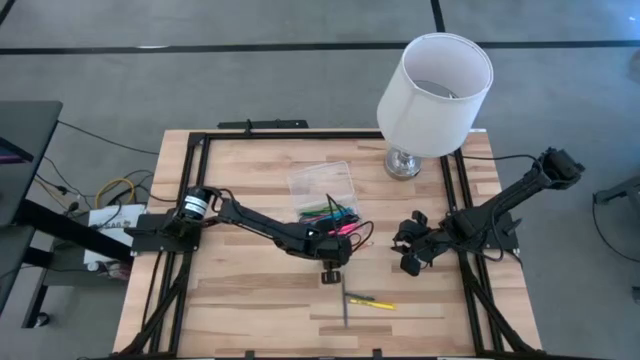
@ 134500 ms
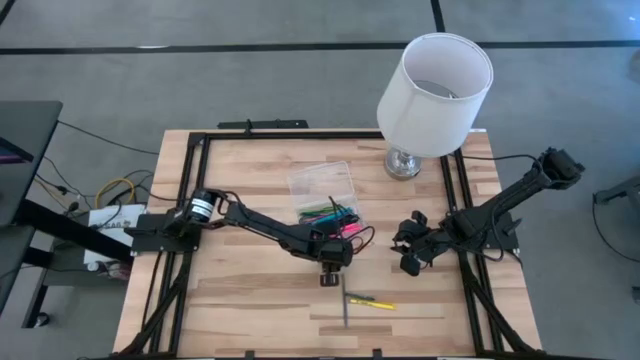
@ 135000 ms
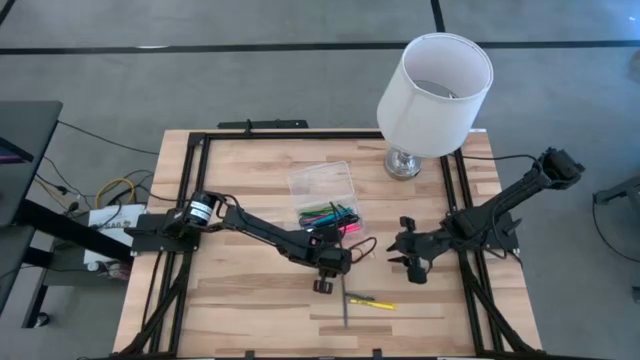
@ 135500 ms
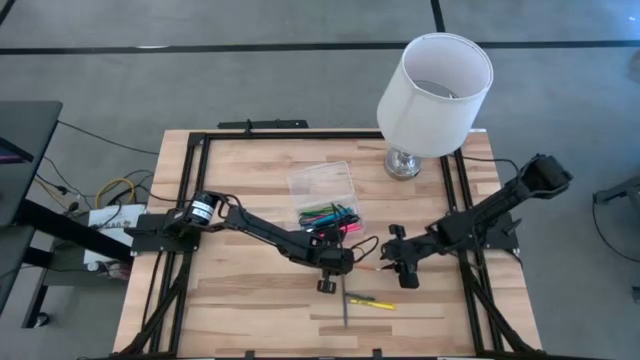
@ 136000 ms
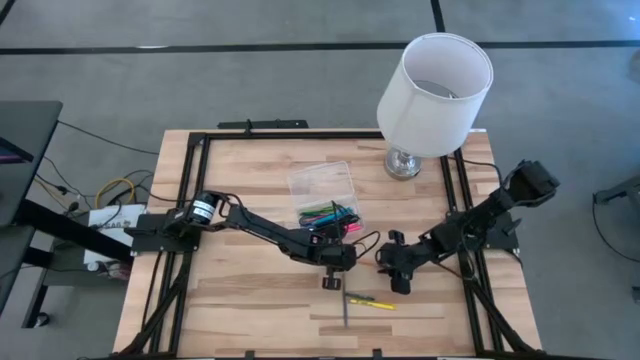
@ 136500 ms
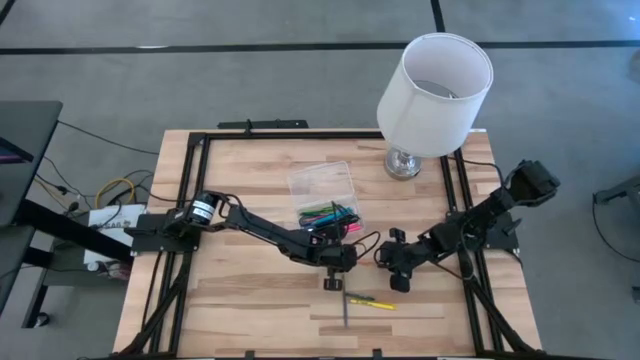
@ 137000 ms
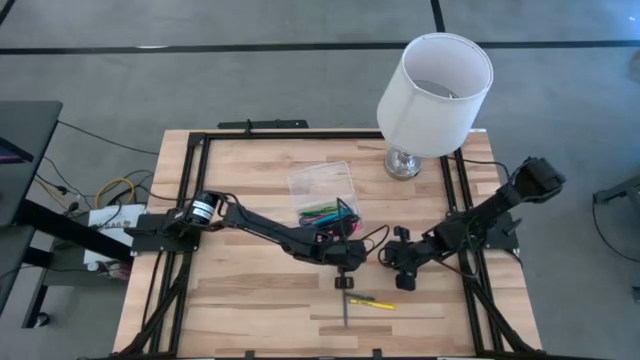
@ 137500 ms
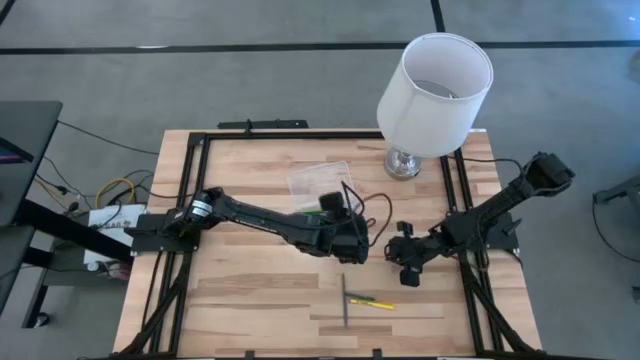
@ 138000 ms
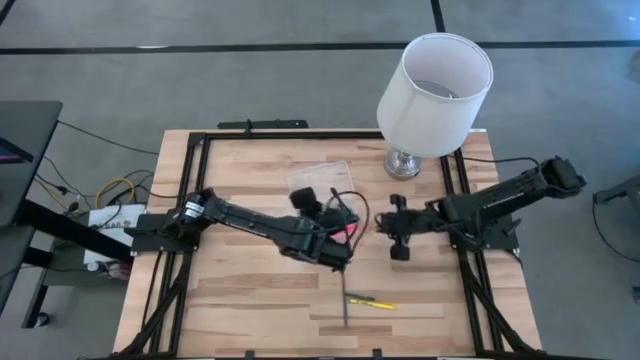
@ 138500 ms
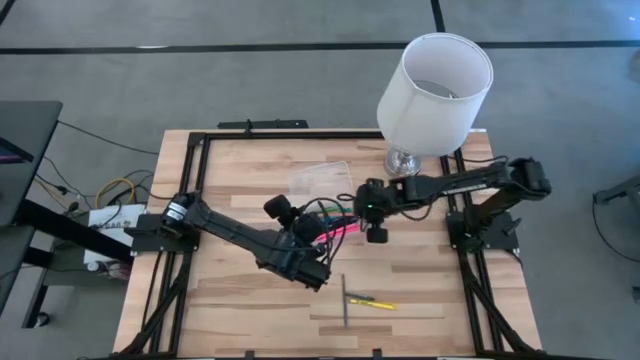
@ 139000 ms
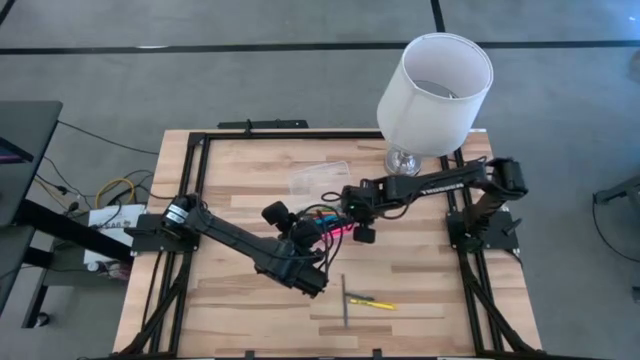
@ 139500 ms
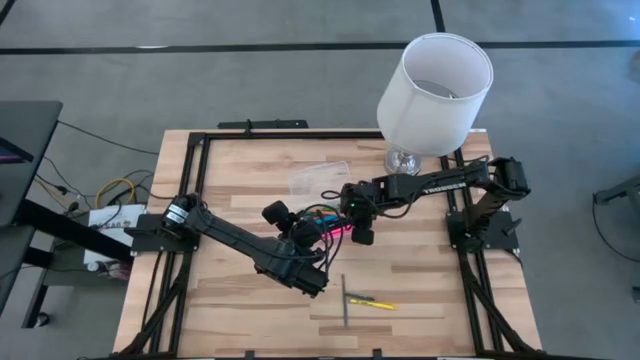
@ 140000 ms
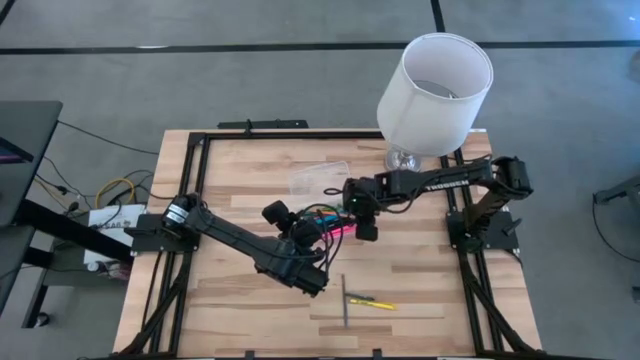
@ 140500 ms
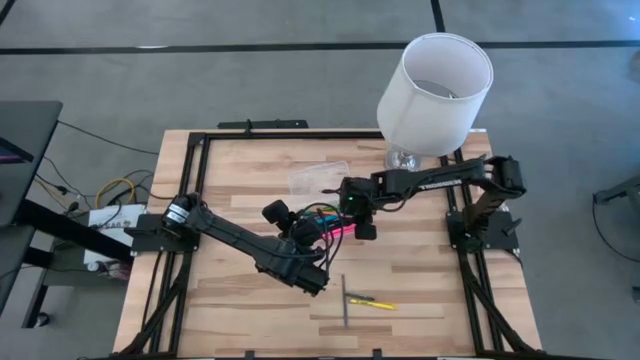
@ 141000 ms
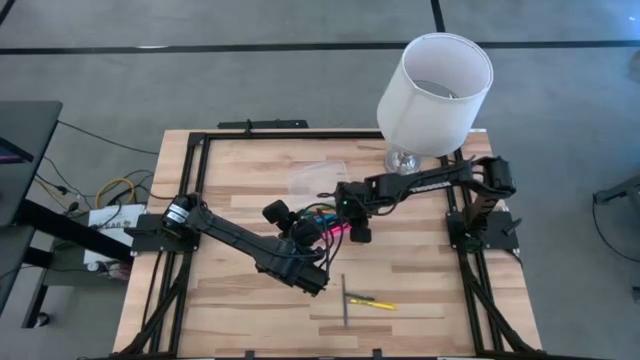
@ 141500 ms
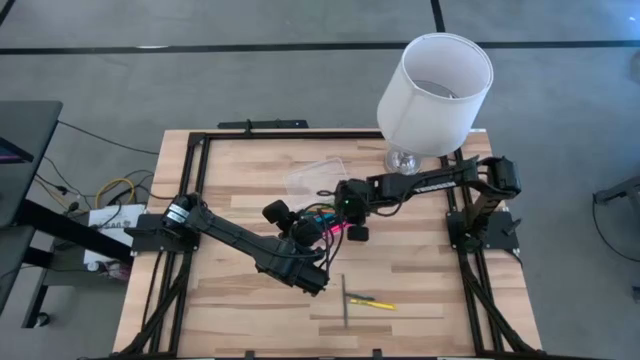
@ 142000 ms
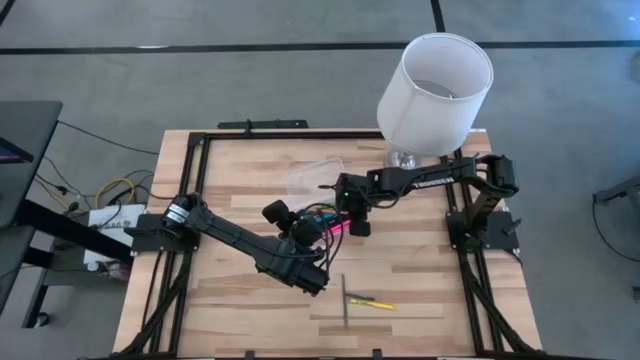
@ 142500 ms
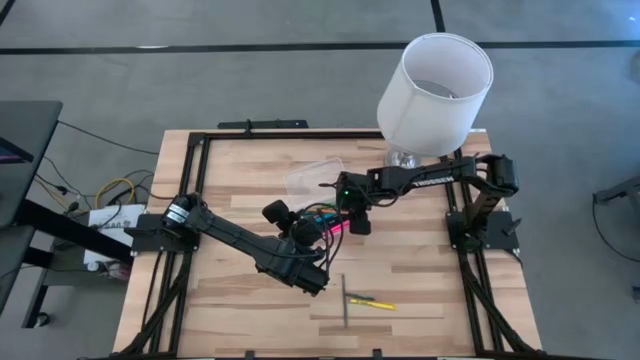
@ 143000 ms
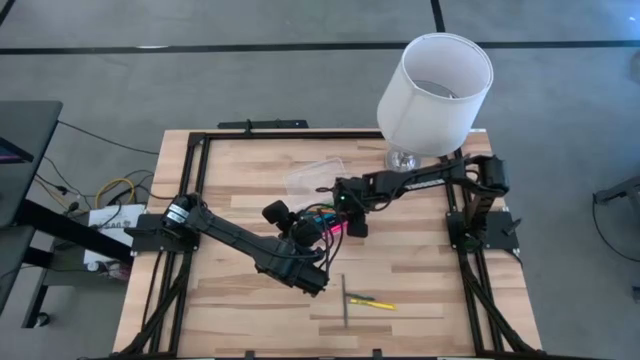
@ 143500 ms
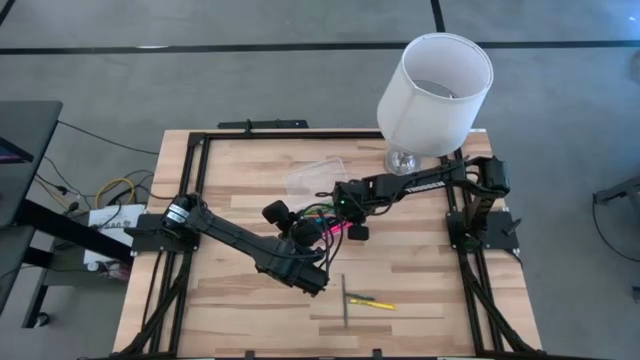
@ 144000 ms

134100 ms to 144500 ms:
Task: Pick & place school supplies into a supply box
Put the yellow pencil into the transparent supply box

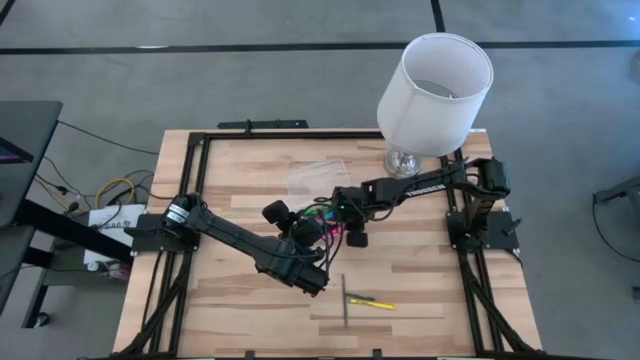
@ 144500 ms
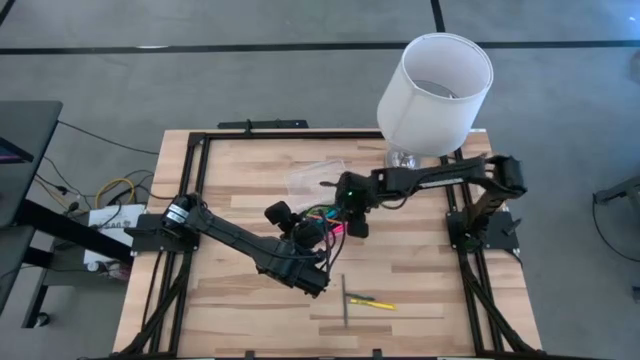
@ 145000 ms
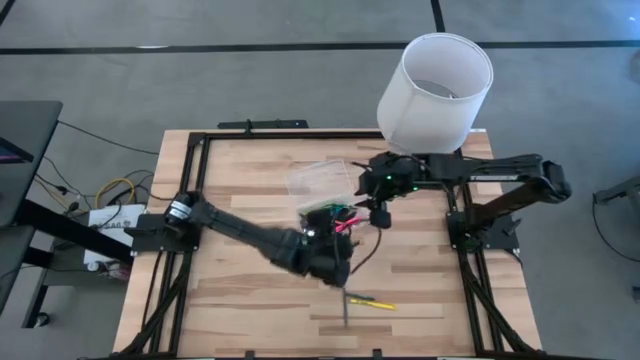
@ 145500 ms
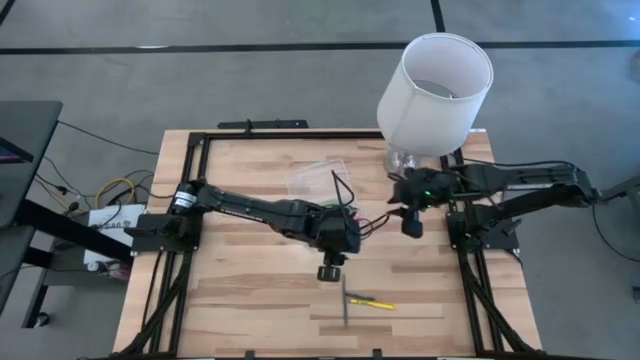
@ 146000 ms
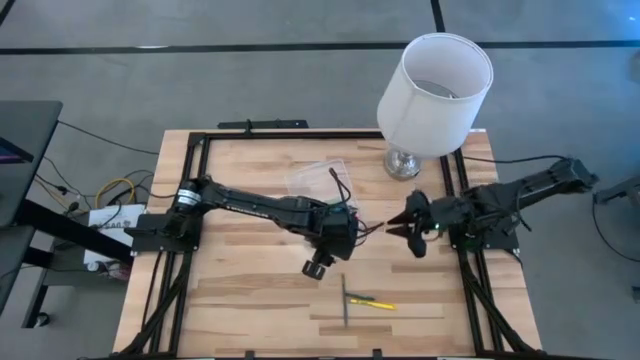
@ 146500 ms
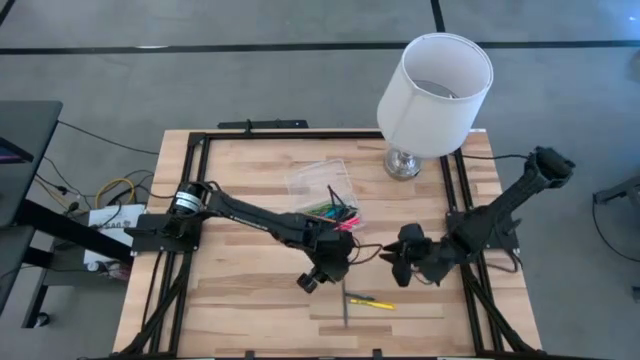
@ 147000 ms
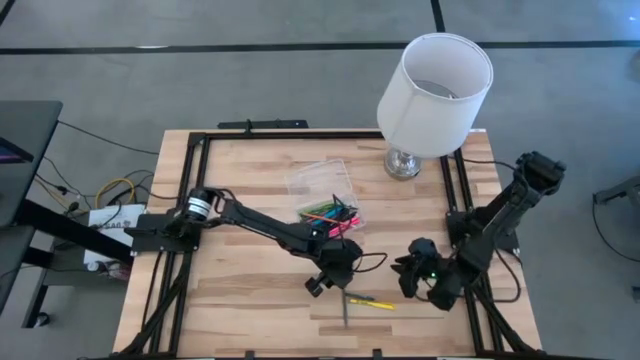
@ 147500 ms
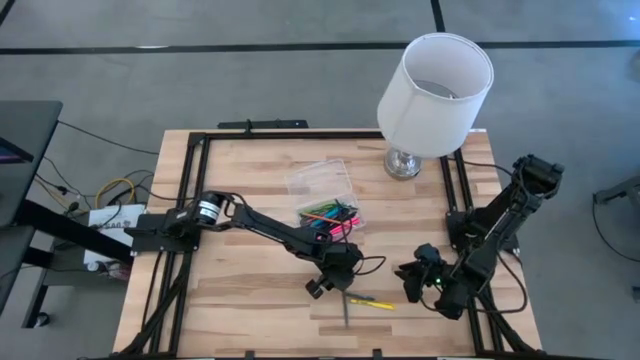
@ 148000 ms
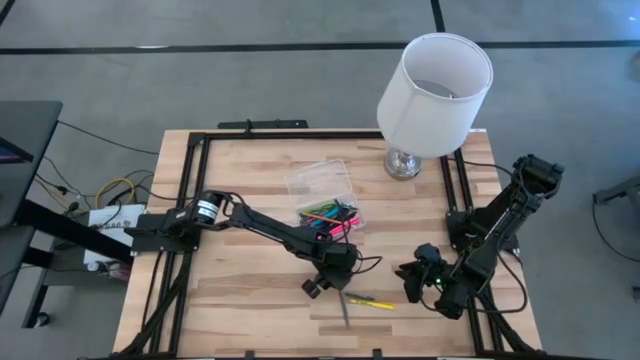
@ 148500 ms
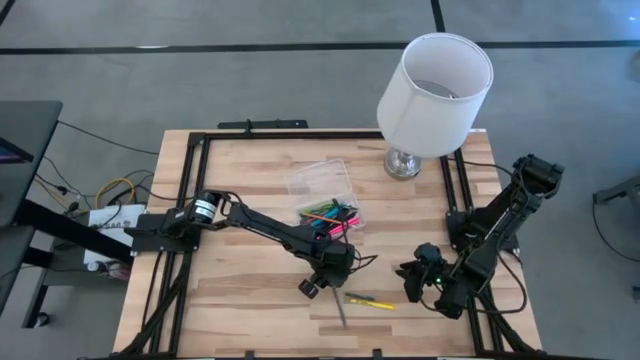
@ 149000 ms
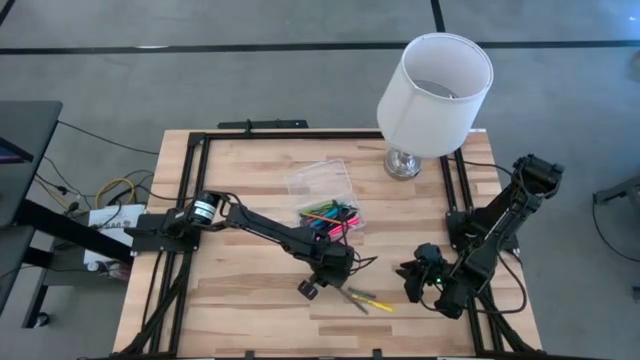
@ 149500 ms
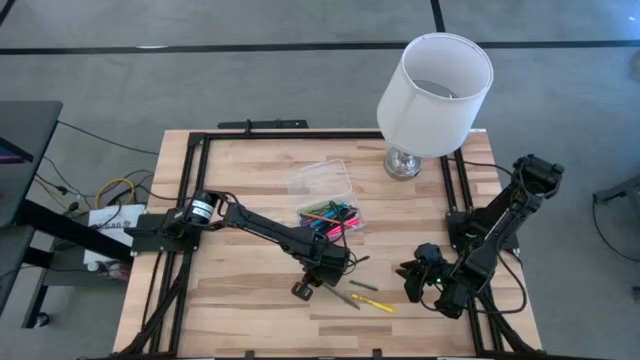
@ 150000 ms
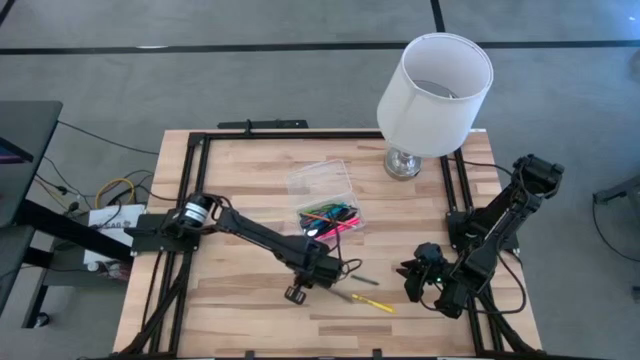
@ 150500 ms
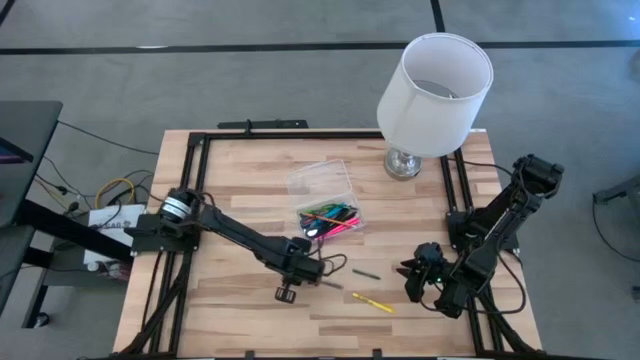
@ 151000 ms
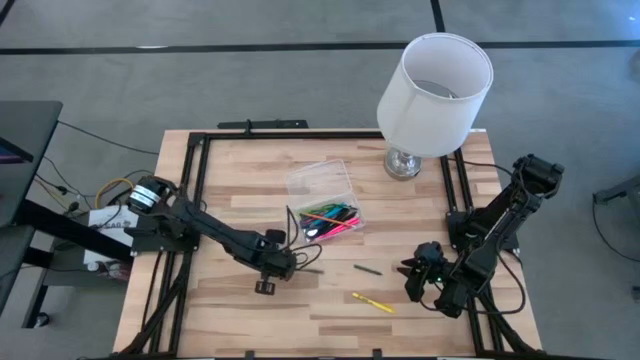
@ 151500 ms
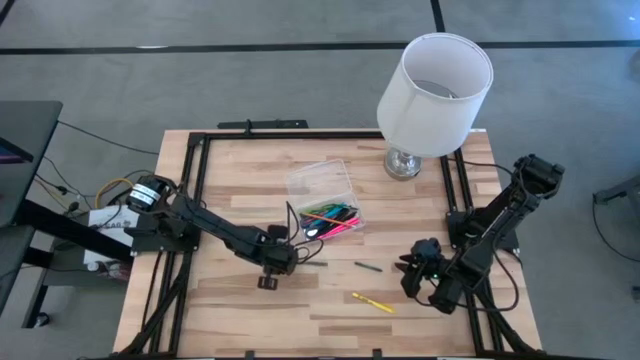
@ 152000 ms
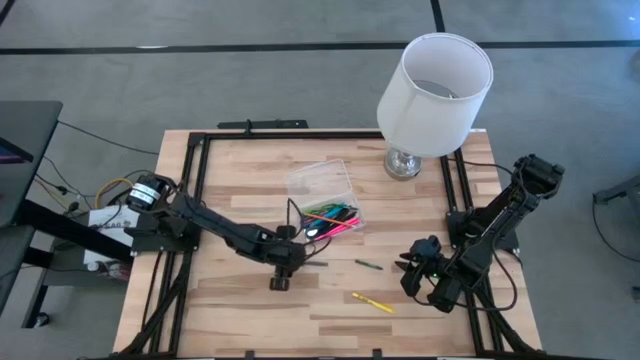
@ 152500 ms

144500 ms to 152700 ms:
Move the gray ballpoint pen near the transparent supply box

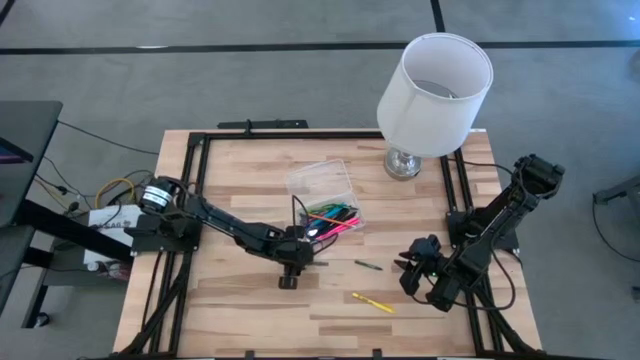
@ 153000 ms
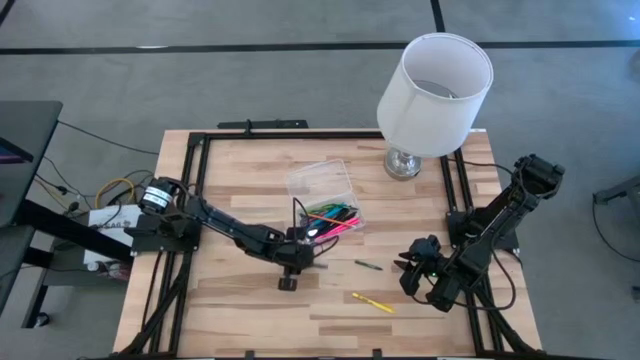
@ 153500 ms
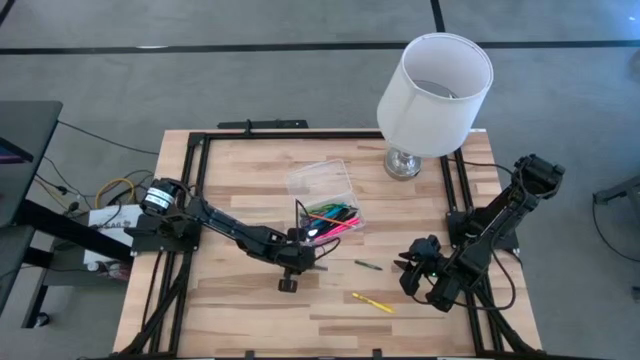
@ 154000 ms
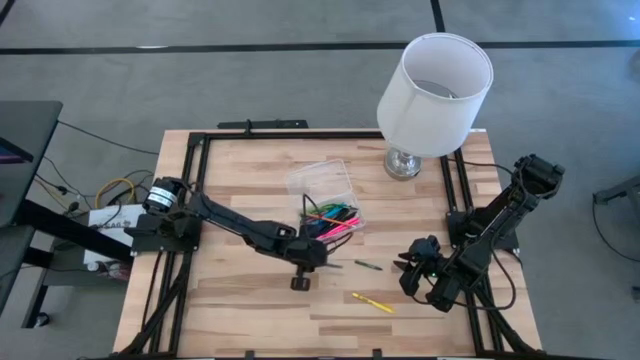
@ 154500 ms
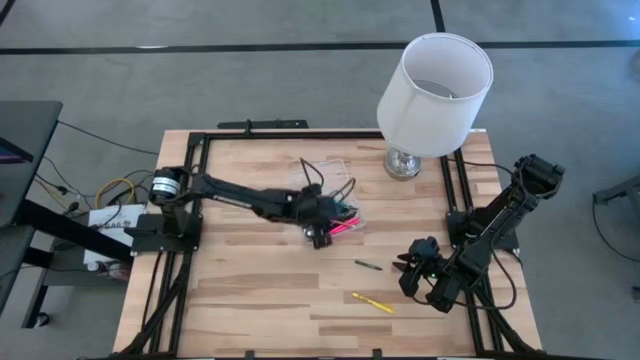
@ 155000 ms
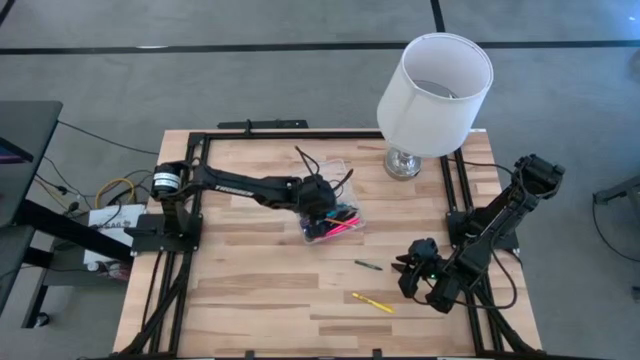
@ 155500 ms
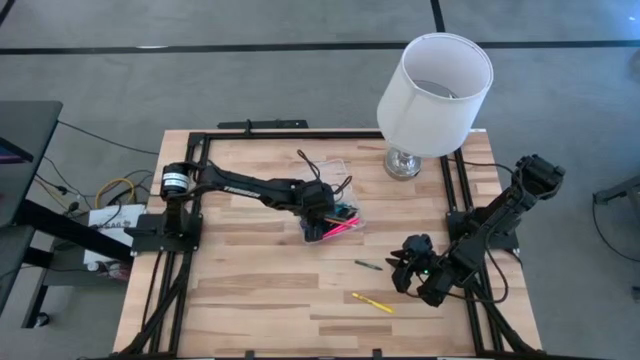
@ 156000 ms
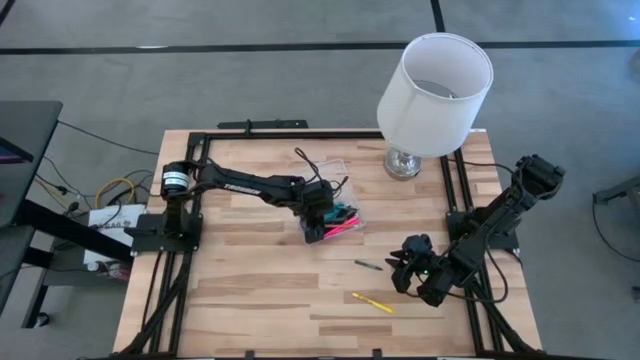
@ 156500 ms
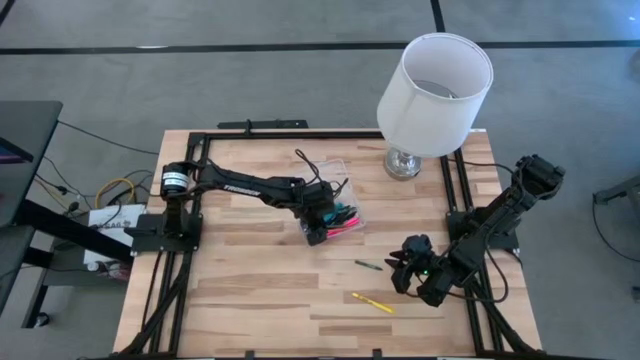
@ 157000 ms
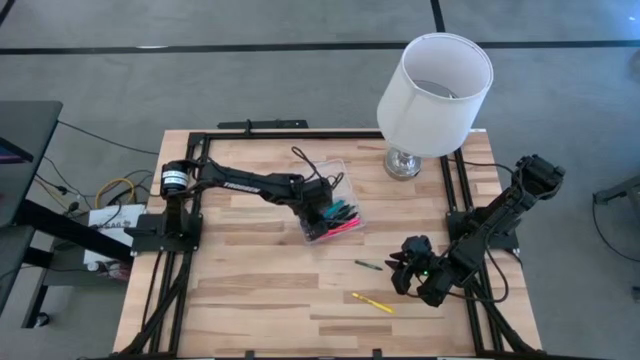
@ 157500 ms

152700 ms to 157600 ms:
Put the gray ballpen into the transparent supply box
